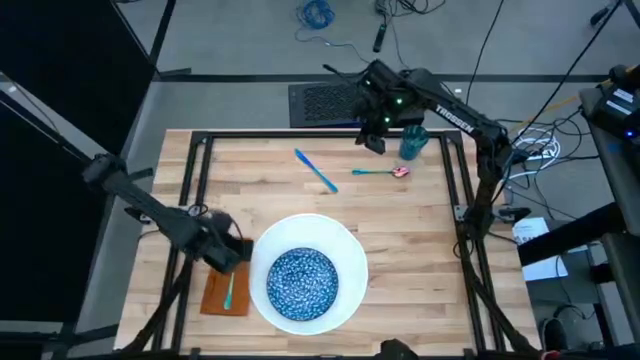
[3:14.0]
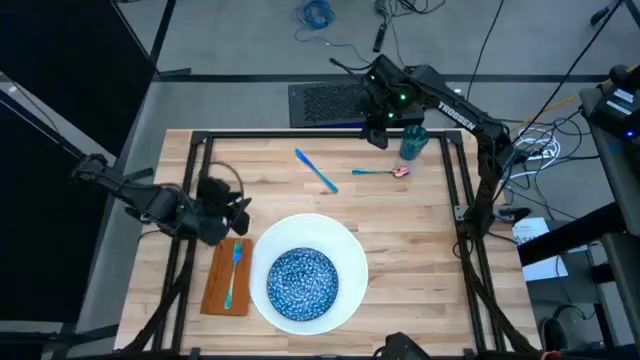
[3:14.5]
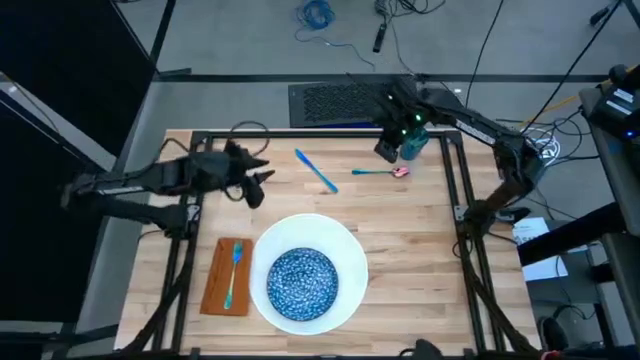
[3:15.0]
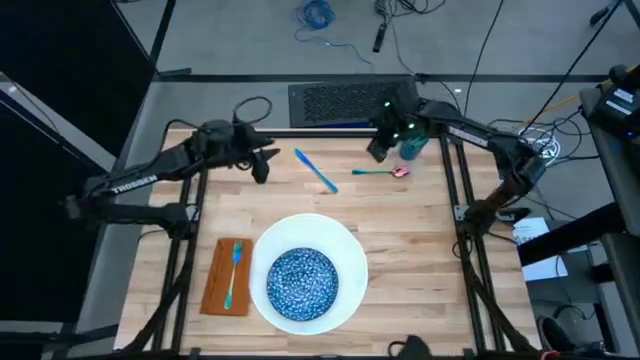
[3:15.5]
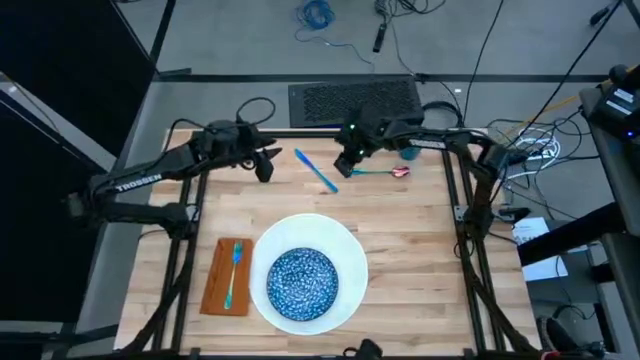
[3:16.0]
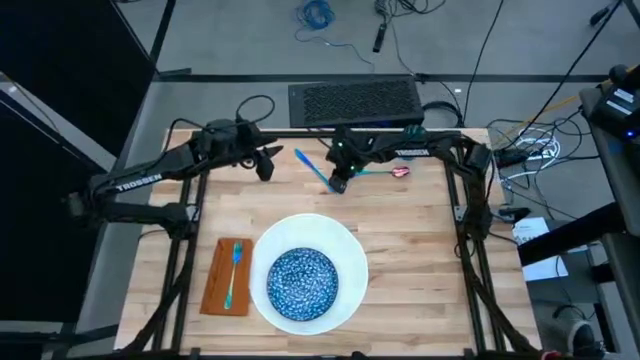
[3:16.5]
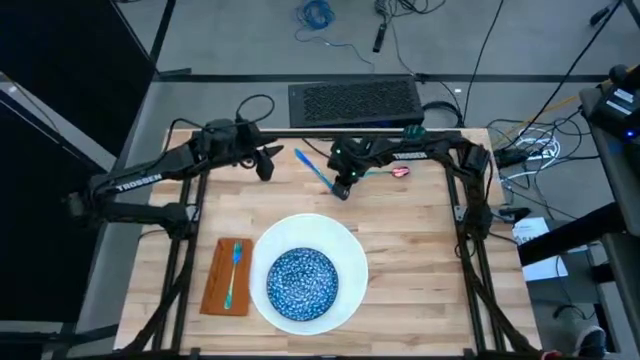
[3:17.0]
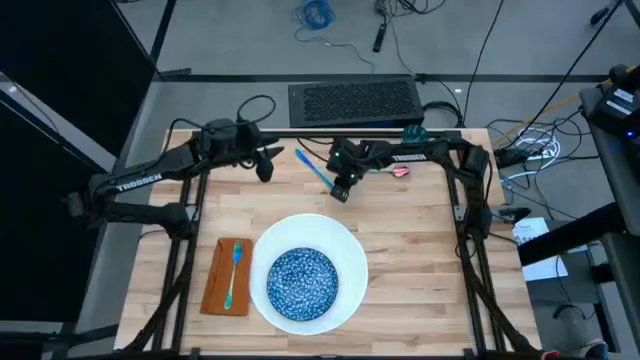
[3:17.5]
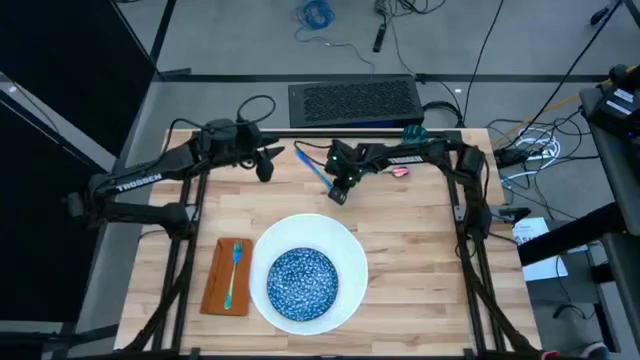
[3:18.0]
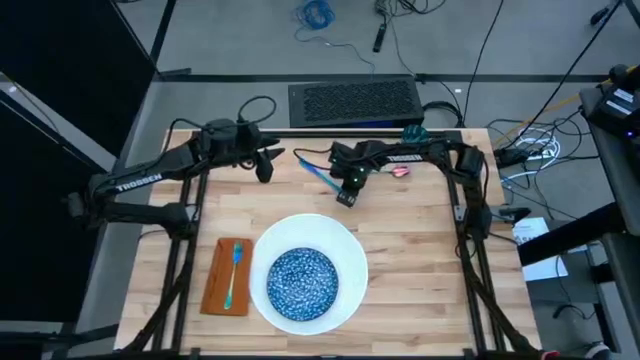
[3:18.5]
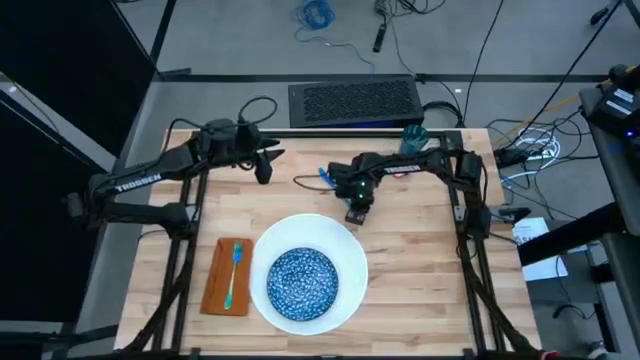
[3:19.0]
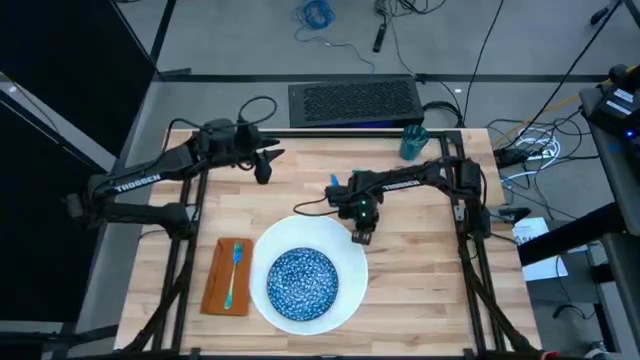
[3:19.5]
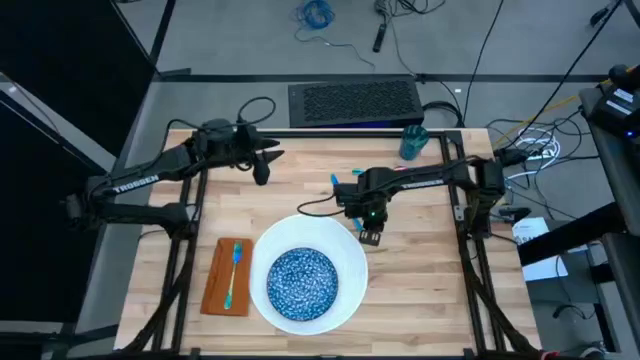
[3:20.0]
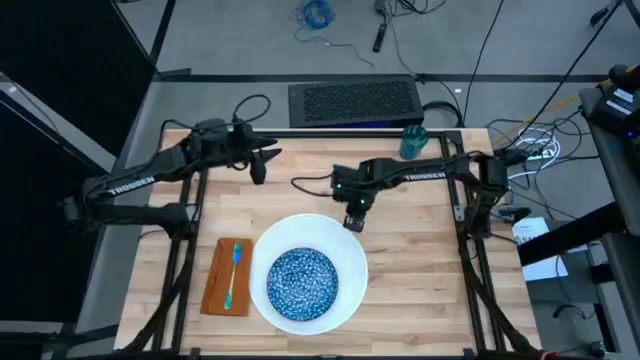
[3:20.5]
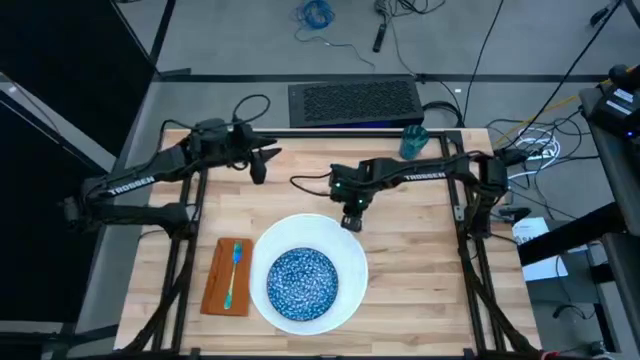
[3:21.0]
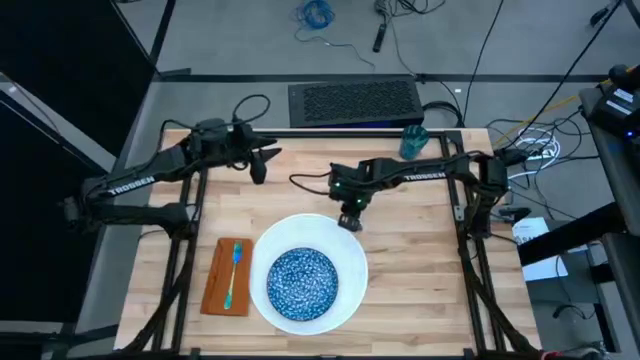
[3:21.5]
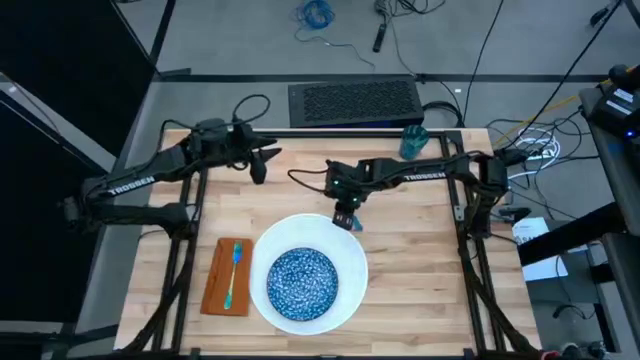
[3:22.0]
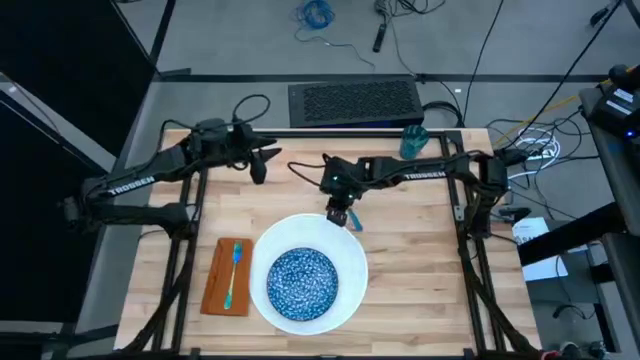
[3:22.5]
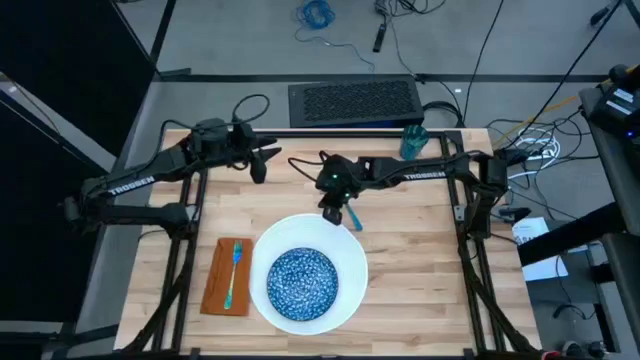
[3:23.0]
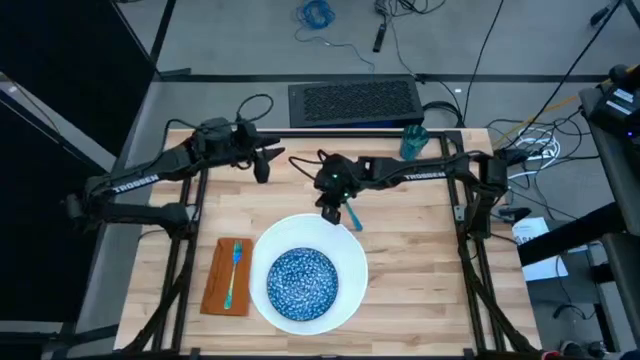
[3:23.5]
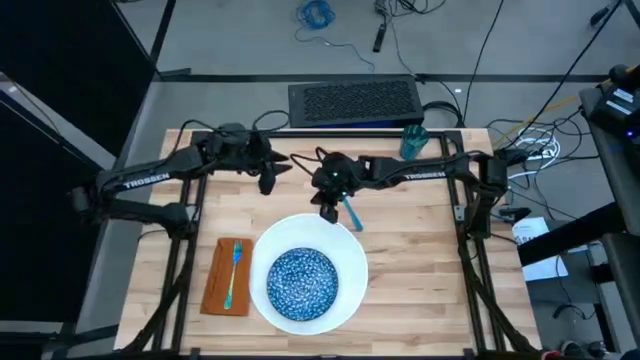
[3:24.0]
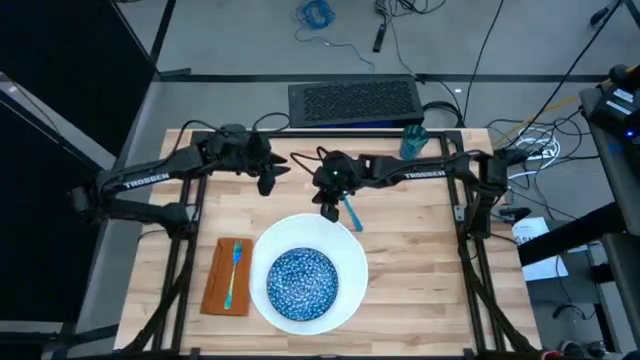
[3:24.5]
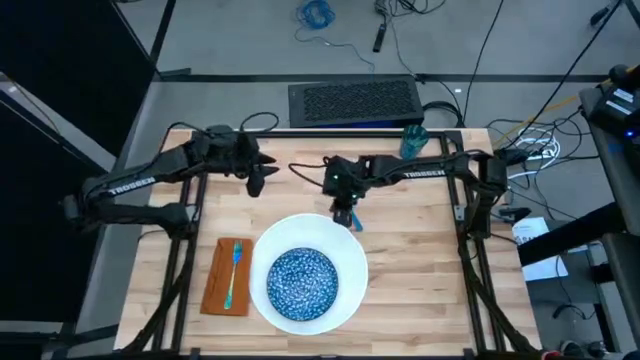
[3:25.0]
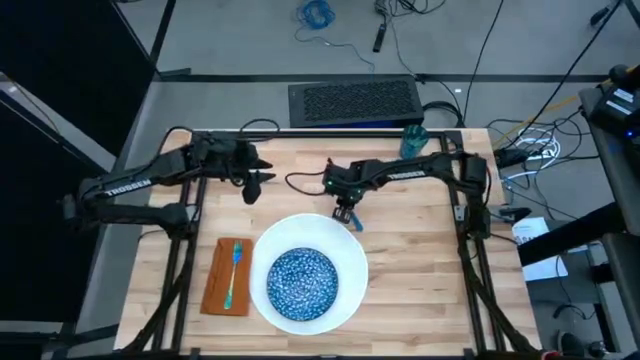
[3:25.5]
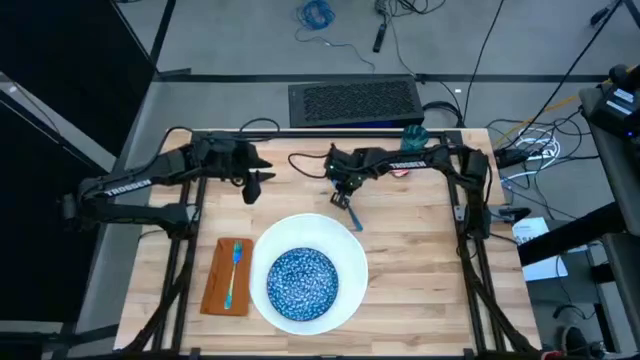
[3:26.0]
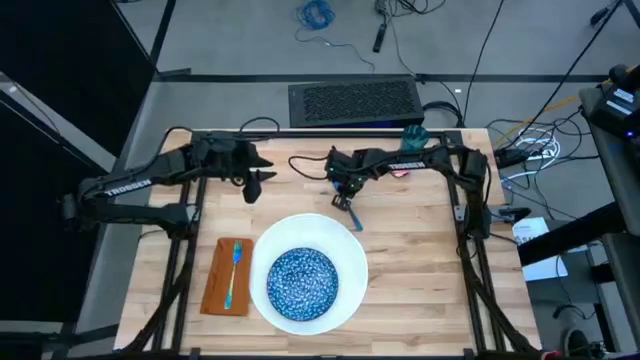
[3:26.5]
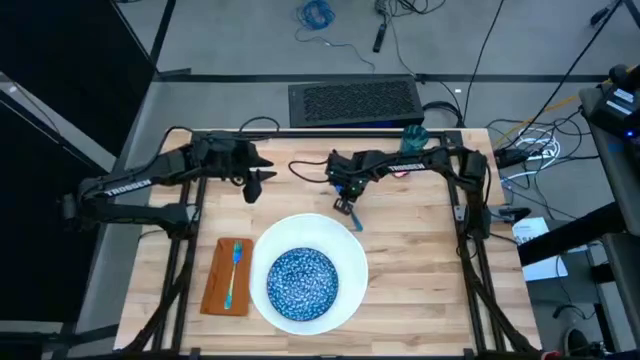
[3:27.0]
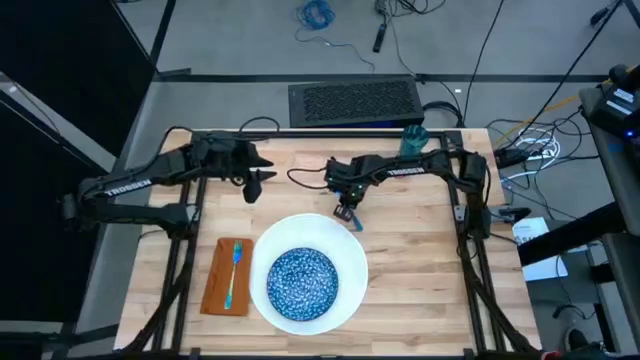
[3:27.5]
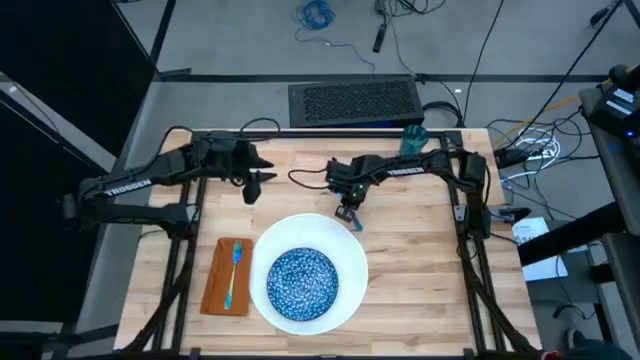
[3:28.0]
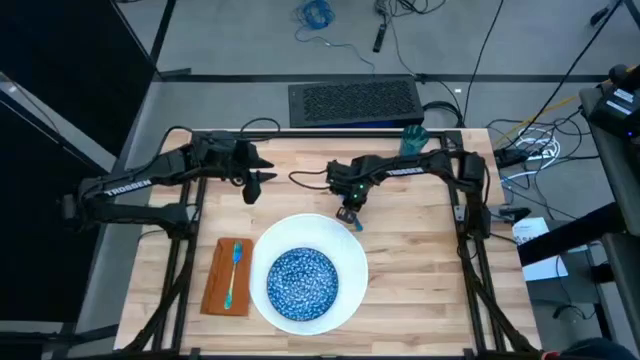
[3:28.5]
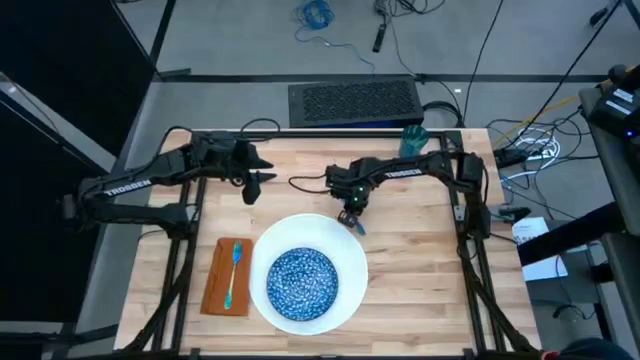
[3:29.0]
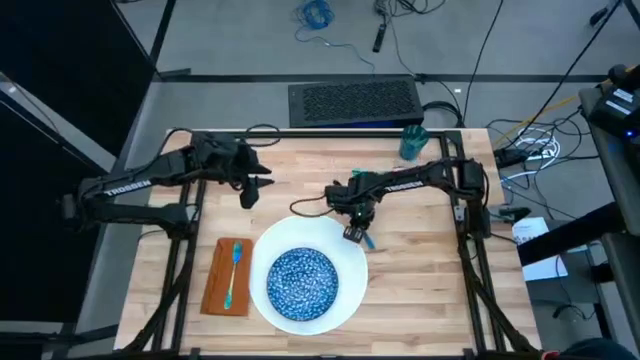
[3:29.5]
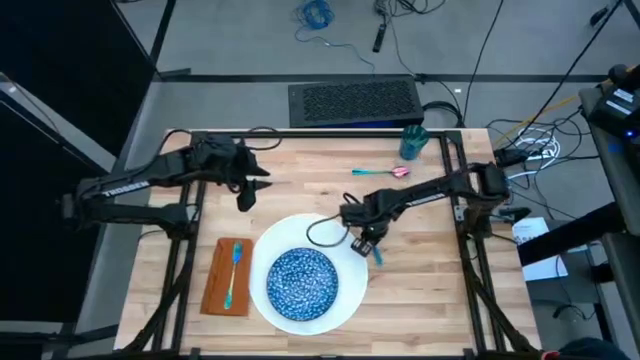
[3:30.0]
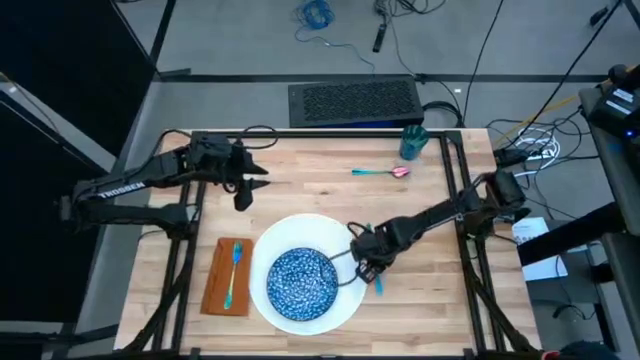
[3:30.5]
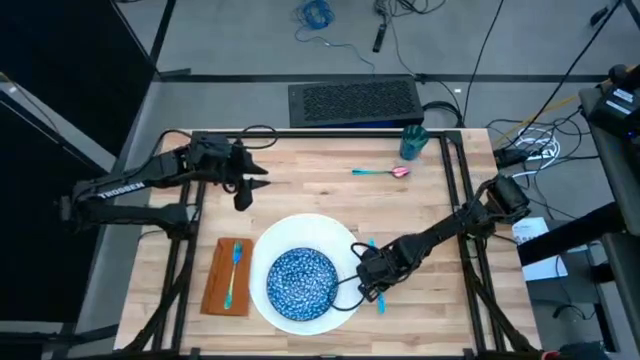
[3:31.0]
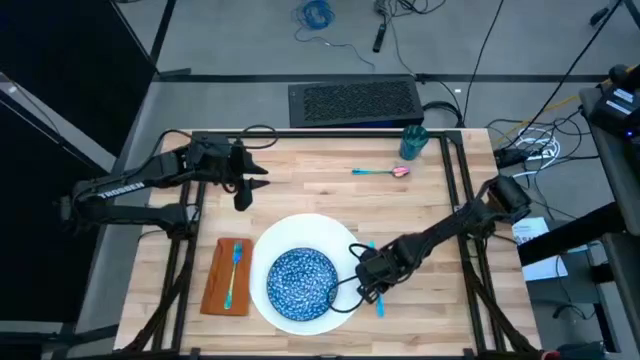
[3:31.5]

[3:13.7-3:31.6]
Task: Set table place
Move the blue table knife to the right of the white table mat

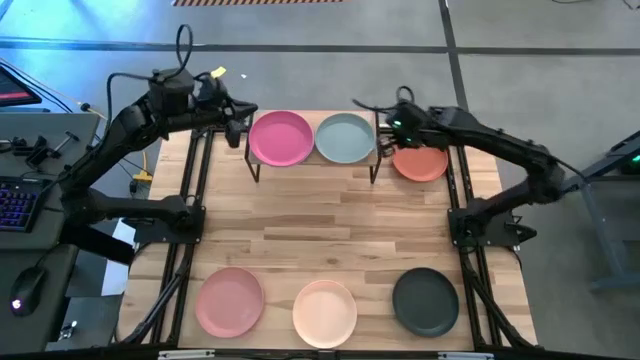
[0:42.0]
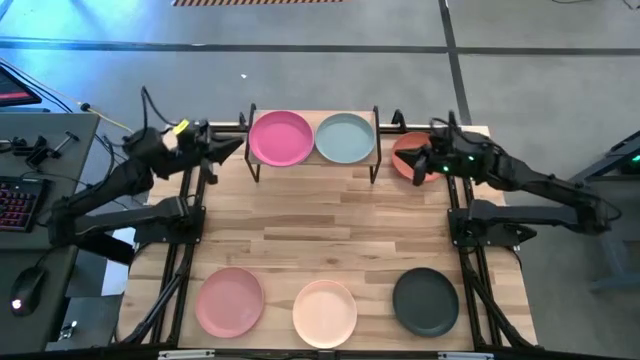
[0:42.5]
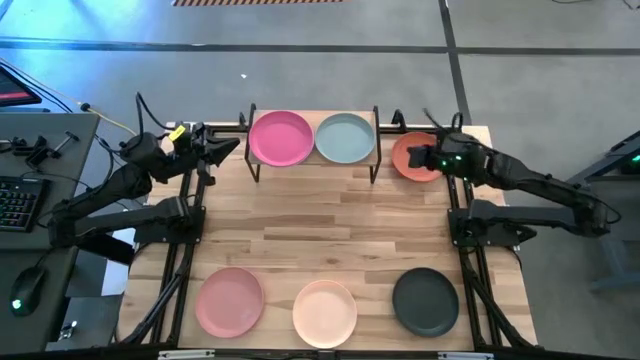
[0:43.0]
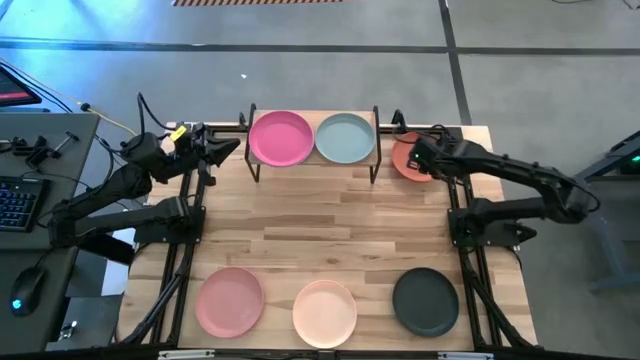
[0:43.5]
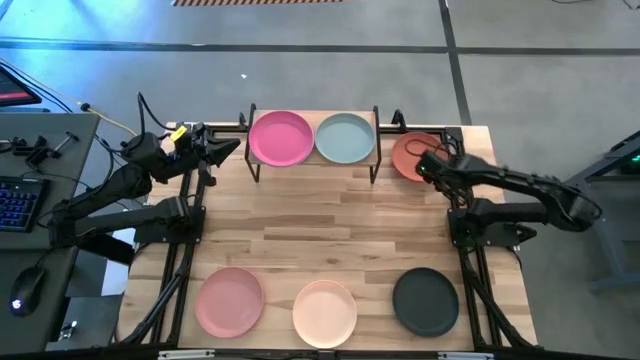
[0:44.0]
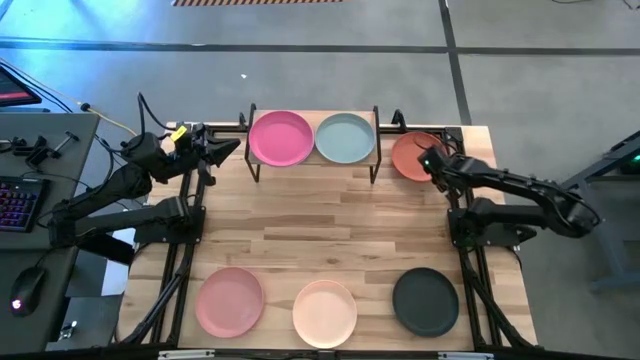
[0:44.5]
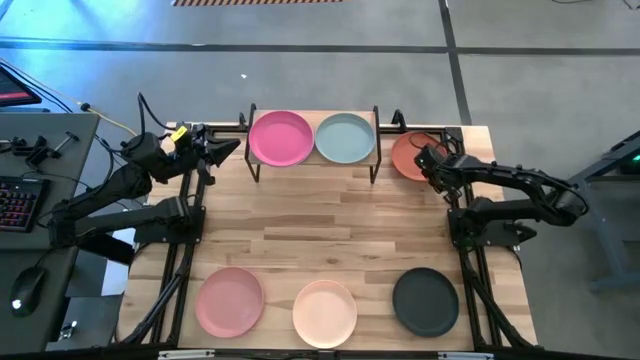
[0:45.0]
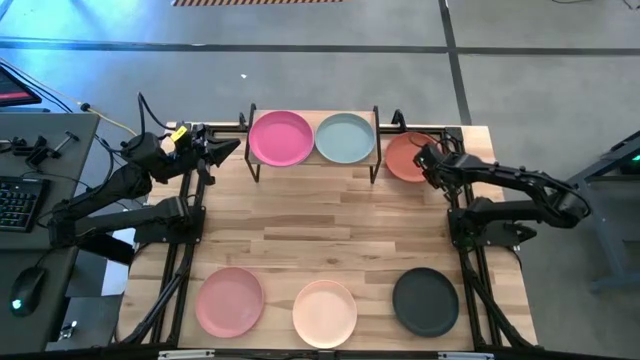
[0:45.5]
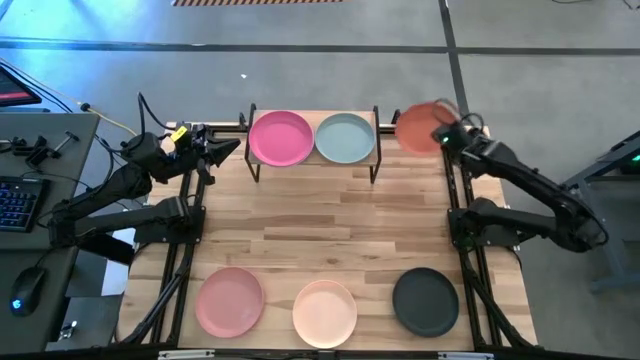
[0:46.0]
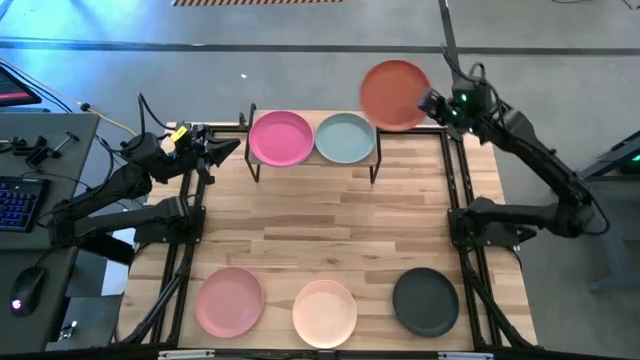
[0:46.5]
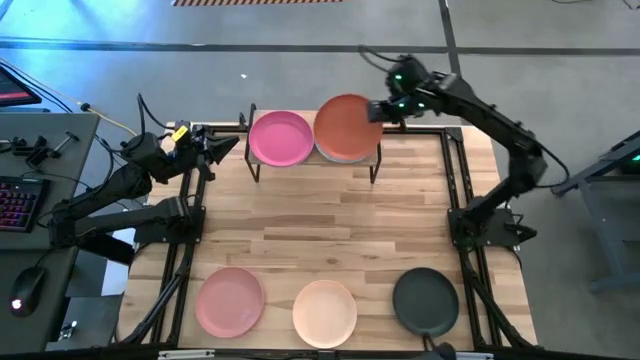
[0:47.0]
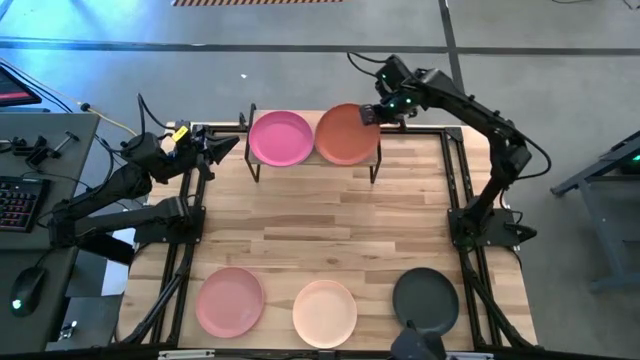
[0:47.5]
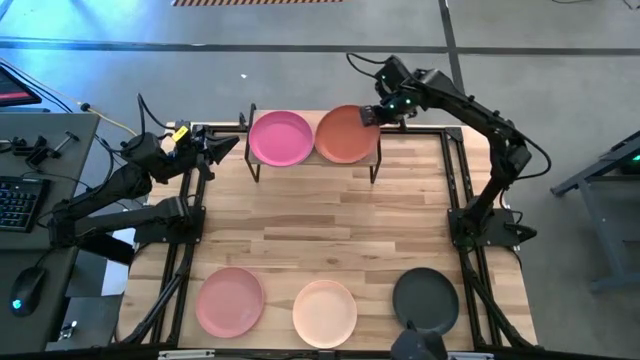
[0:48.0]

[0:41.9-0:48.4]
Task: Place and stack plates onto a shelf
Stack the orange plate on top of the gray plate on the shelf
